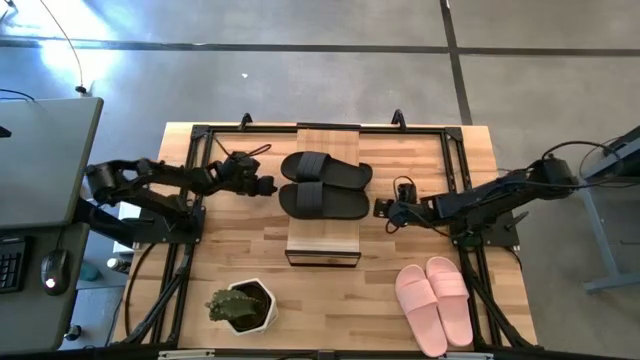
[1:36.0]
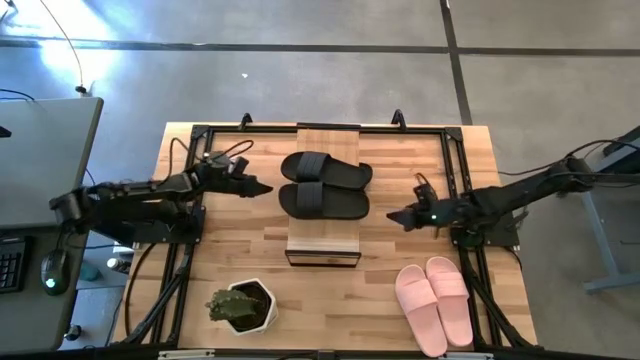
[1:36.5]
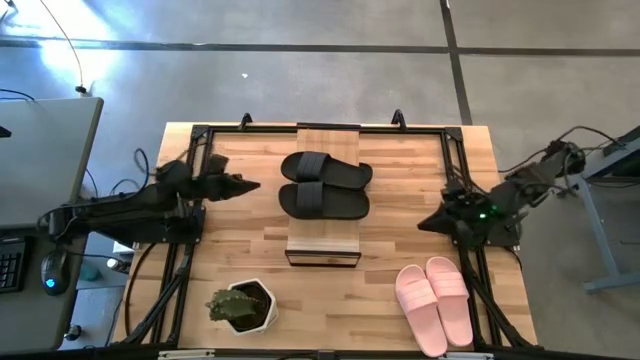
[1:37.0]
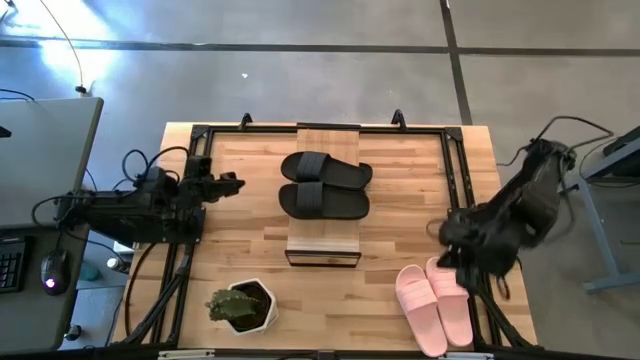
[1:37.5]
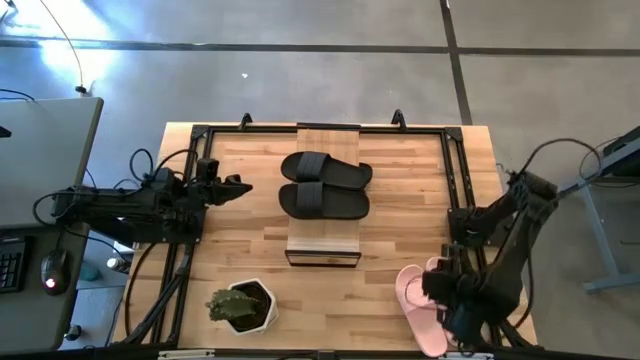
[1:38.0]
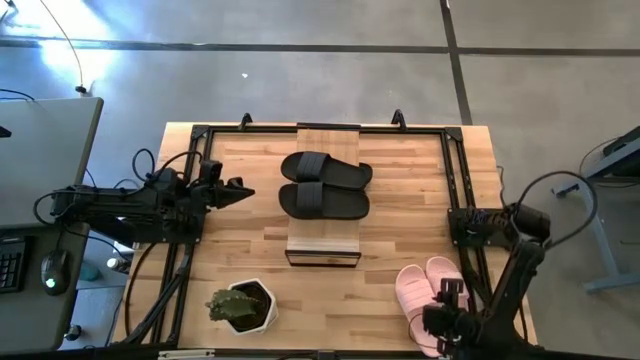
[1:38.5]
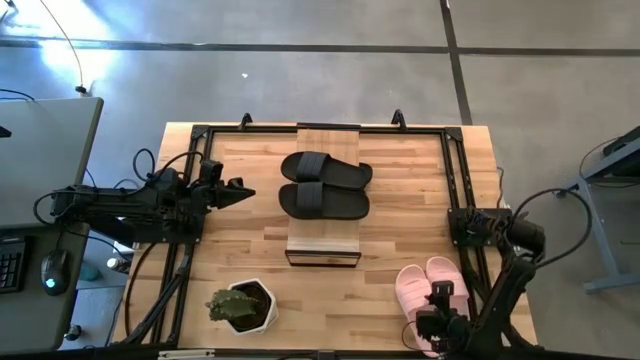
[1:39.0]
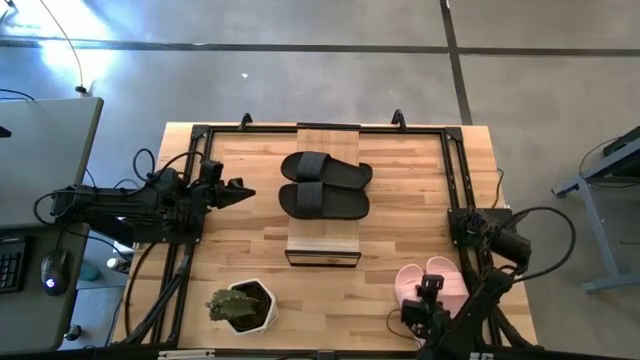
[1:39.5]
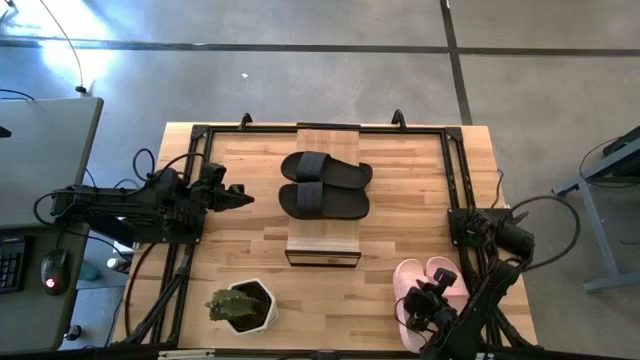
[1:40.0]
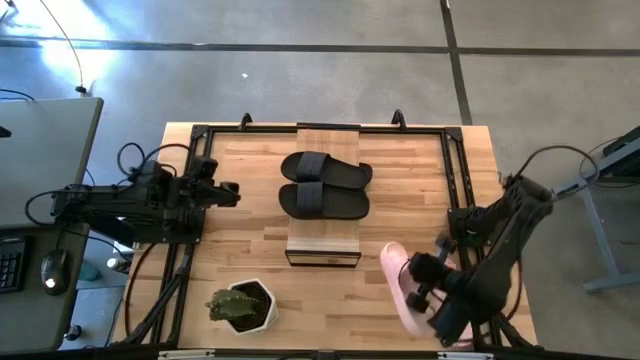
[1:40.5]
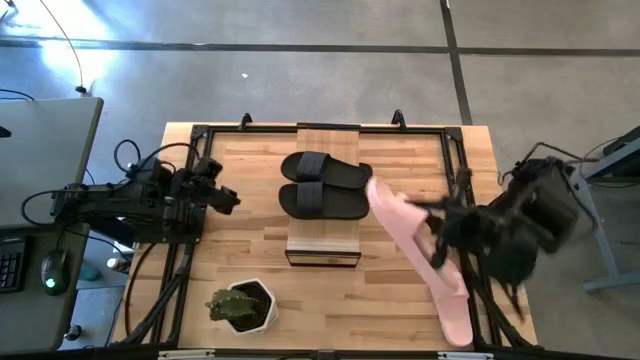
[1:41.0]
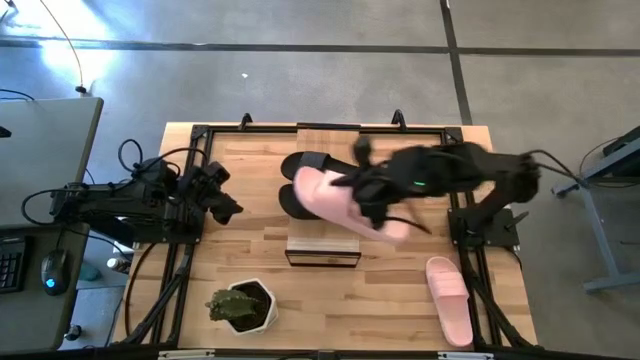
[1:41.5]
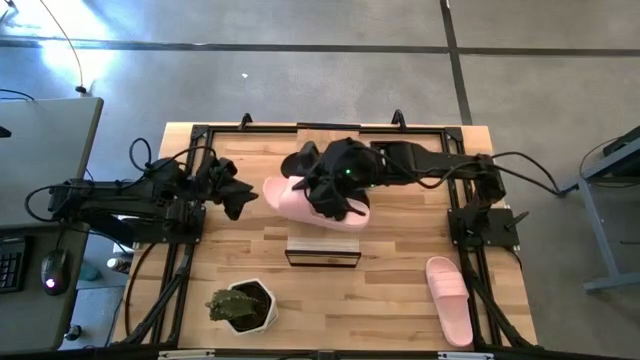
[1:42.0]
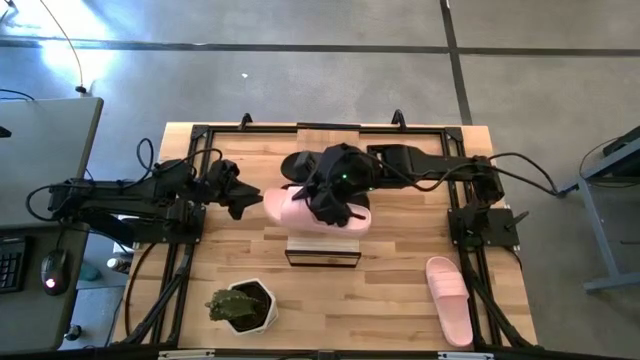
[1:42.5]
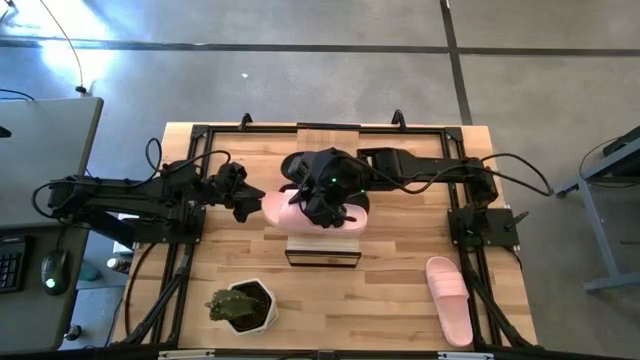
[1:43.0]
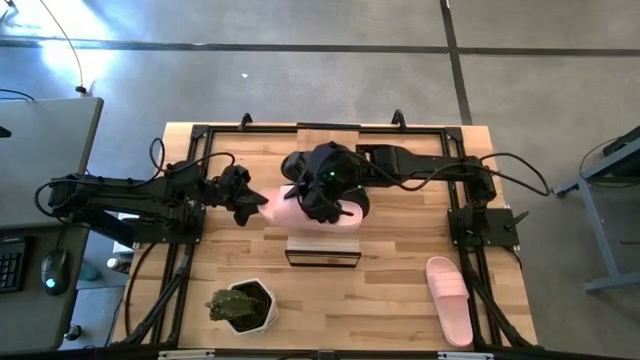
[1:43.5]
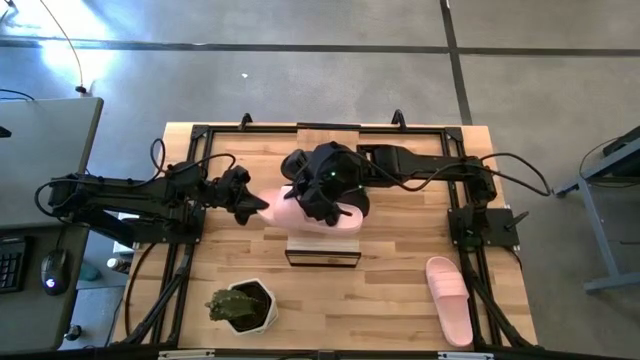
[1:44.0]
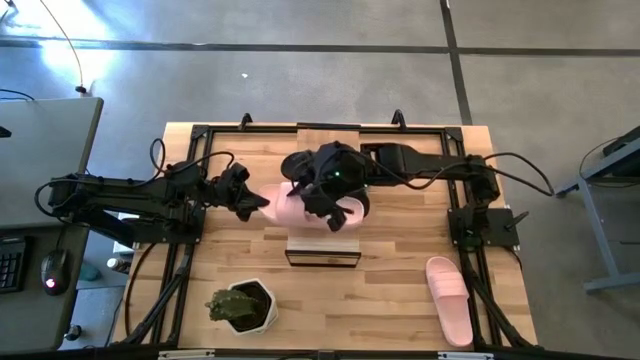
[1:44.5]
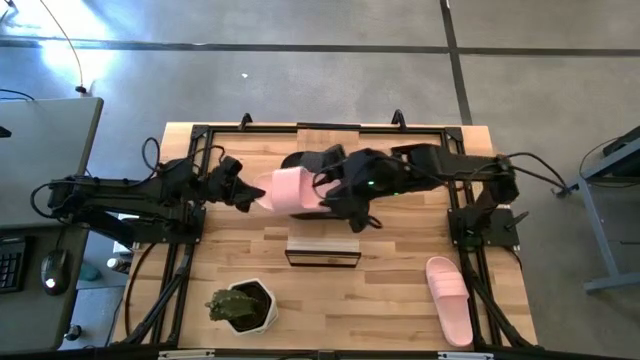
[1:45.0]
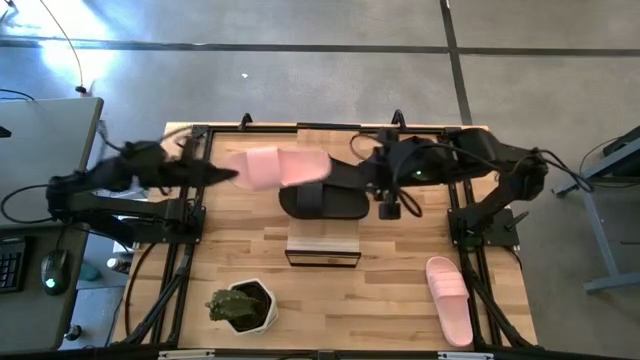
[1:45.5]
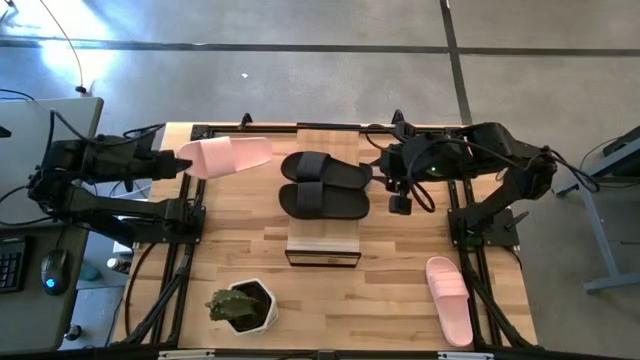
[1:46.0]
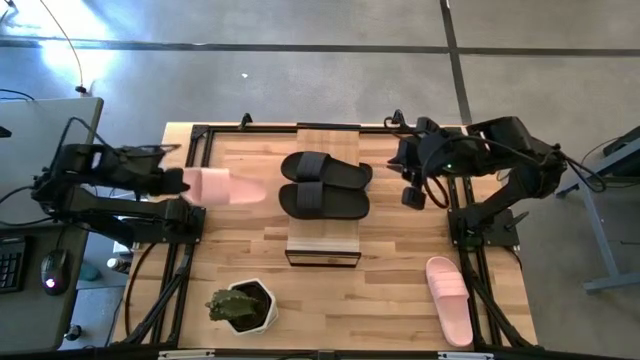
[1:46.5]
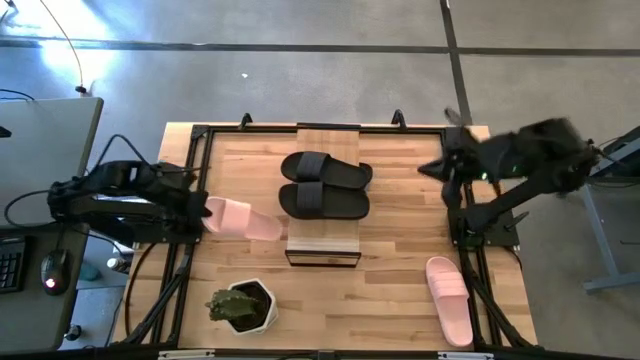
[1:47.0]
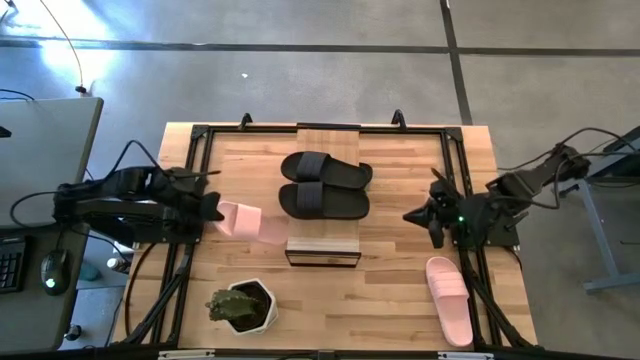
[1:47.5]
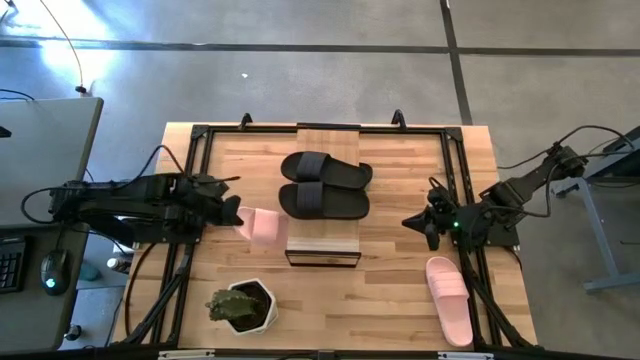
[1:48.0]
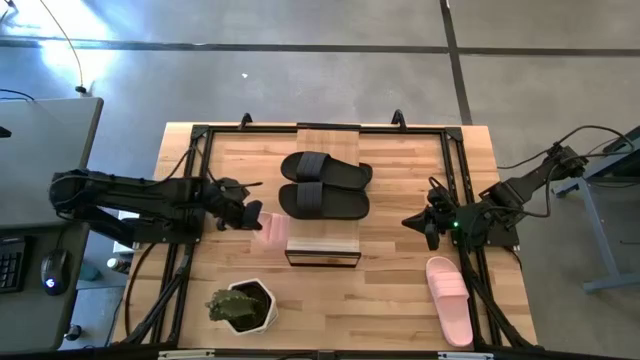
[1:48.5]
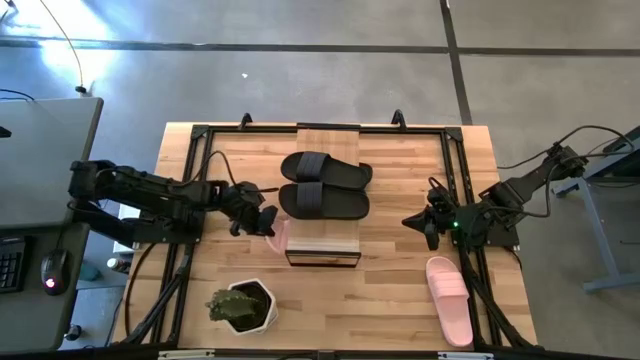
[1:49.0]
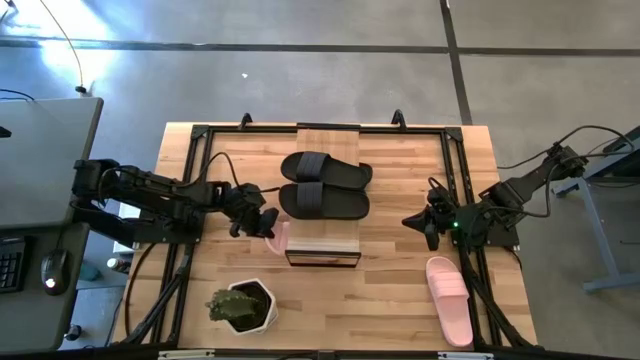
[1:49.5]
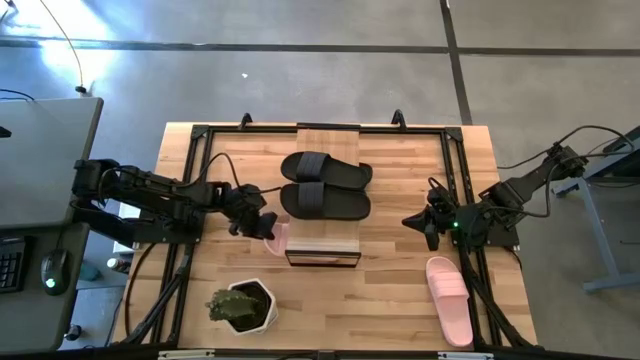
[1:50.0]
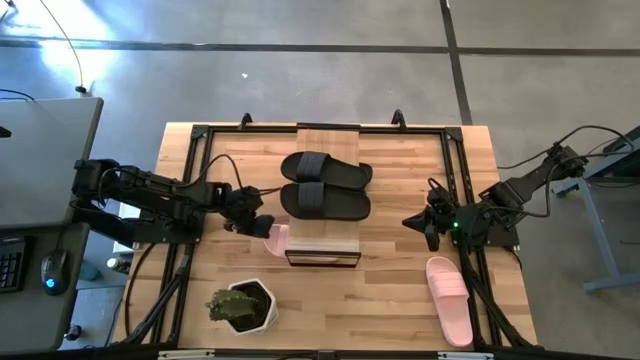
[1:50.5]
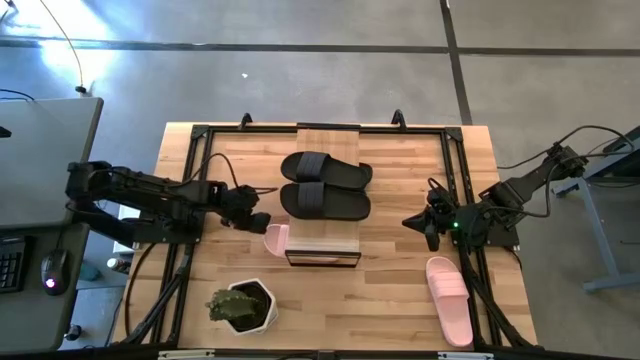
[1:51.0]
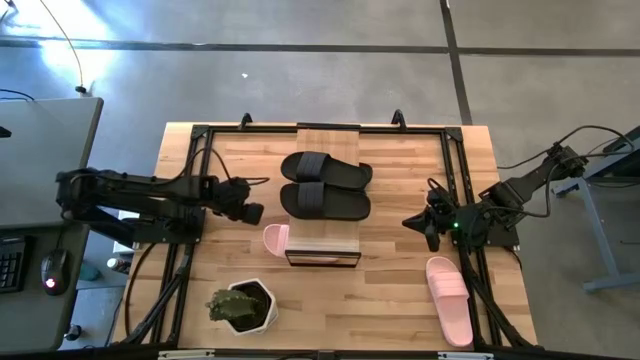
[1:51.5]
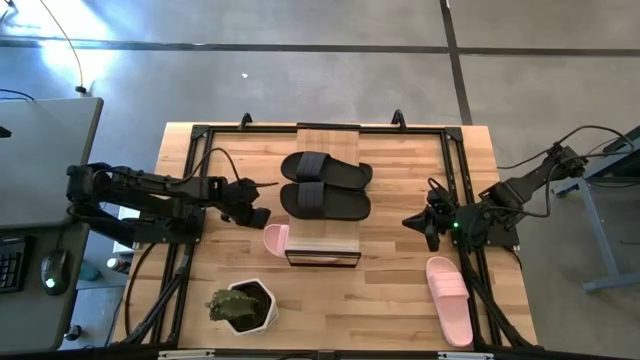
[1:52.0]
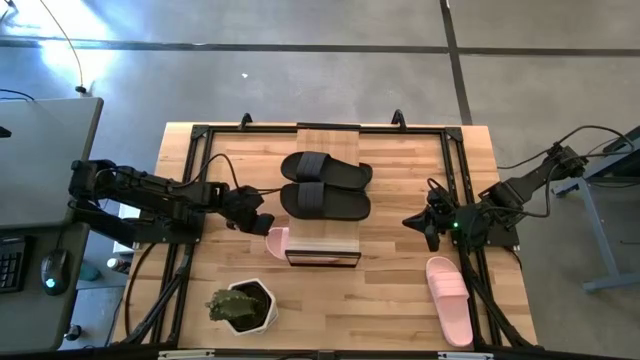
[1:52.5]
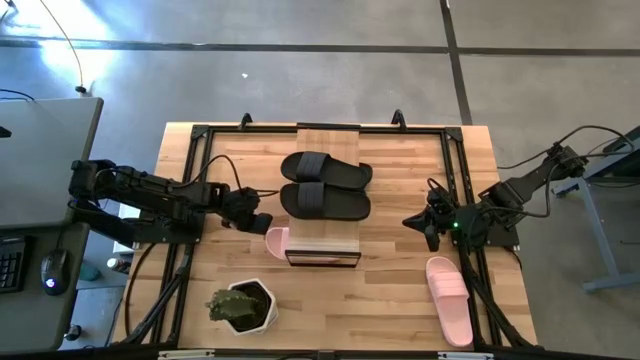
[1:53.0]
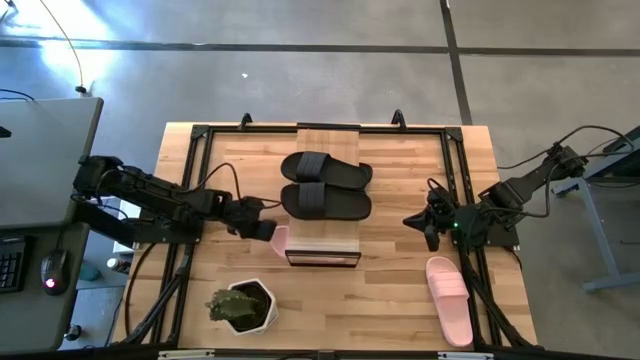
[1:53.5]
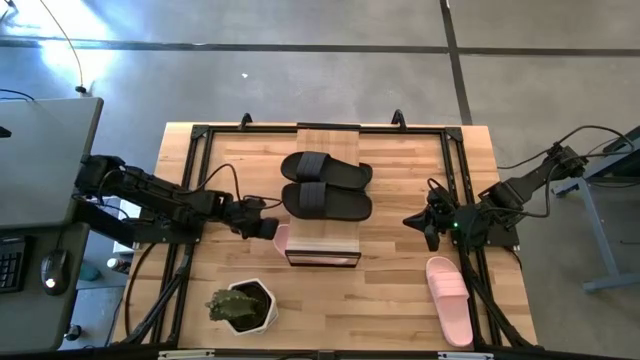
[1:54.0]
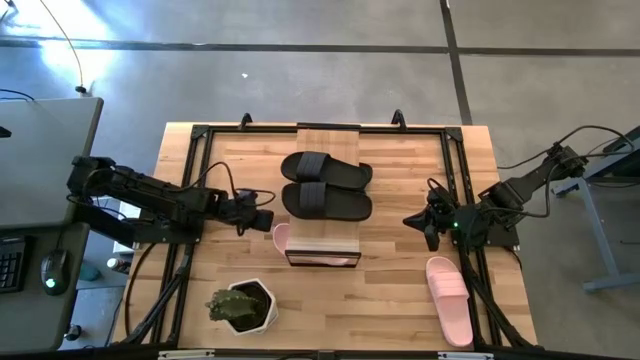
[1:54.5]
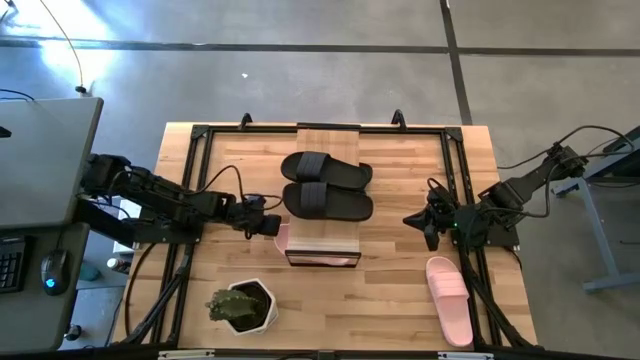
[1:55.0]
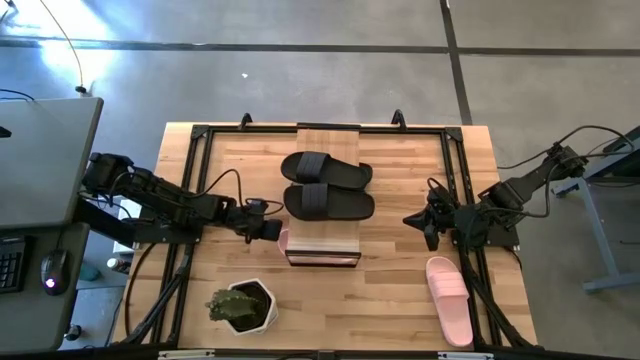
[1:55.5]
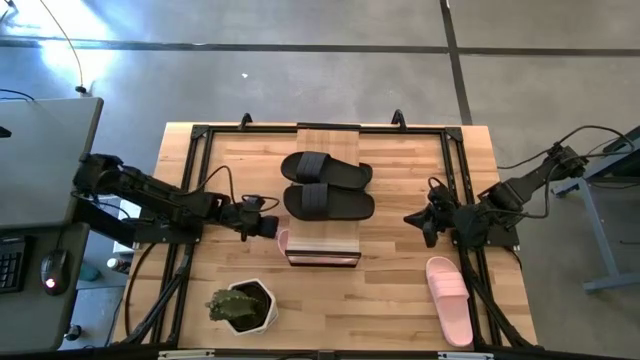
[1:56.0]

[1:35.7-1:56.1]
Task: Pick and place slides into the shelf
Put the pink slipper under the shelf

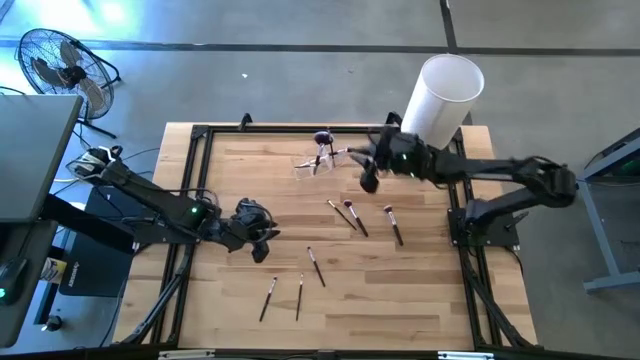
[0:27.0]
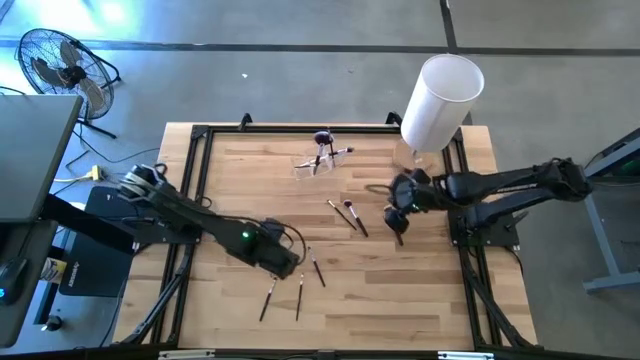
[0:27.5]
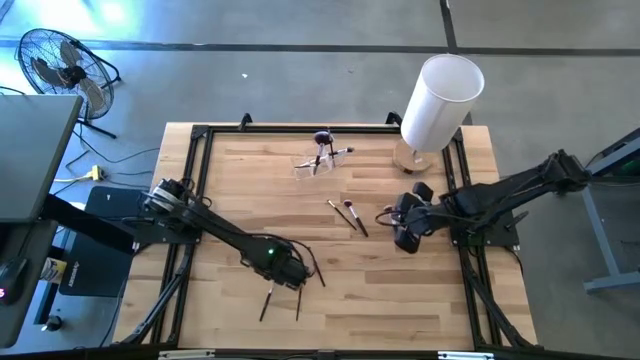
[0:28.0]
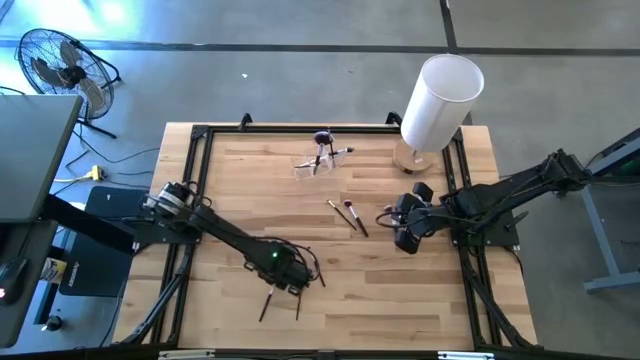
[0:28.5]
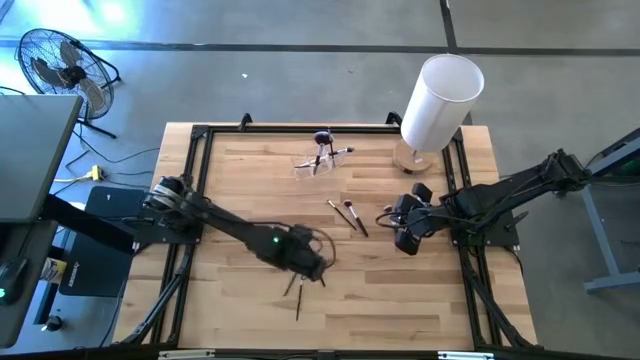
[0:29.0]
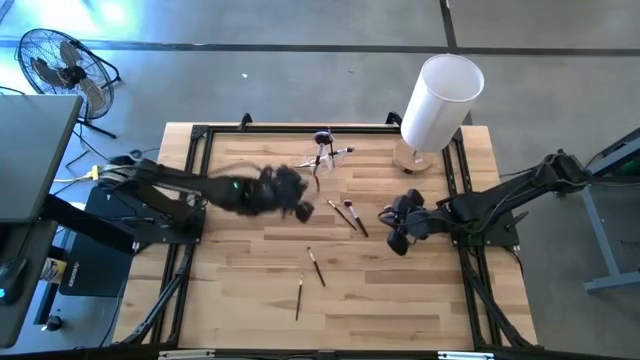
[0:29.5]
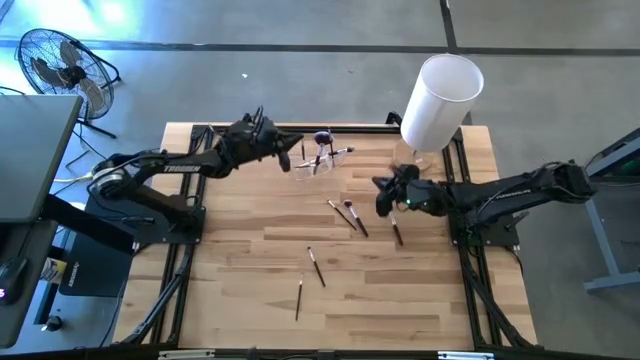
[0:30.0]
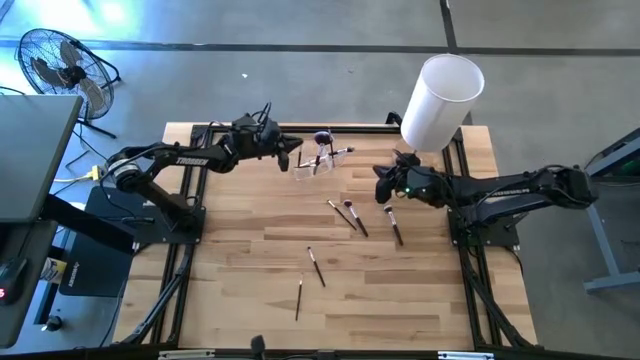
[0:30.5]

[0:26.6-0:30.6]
Task: Put items in baskets/containers
Put the black eyeshadow brush into the transparent organizer
